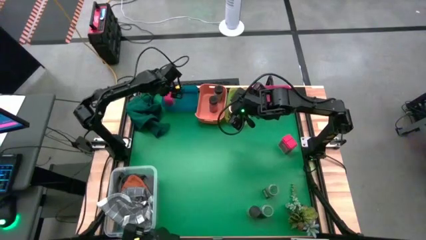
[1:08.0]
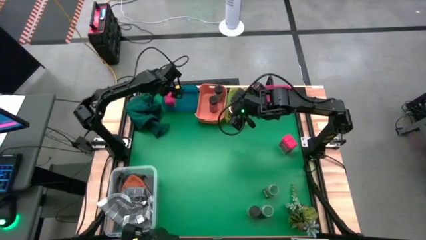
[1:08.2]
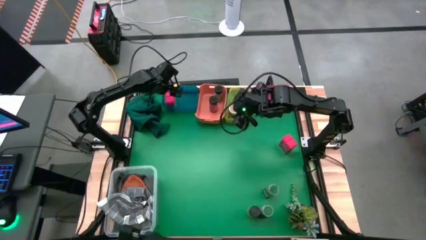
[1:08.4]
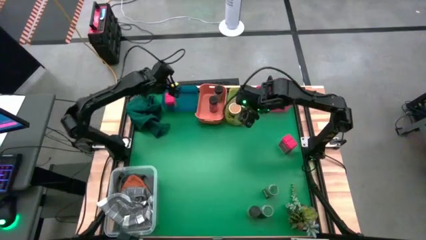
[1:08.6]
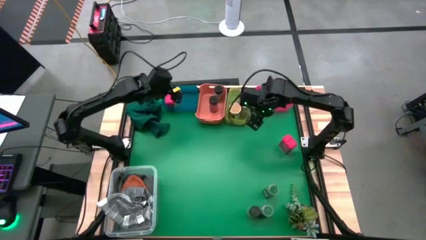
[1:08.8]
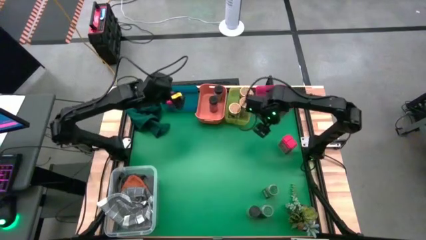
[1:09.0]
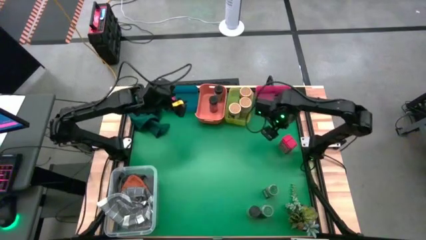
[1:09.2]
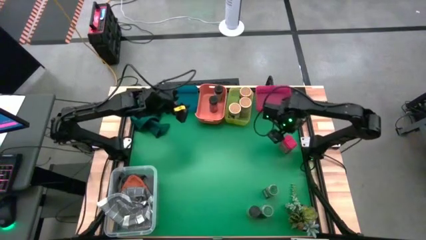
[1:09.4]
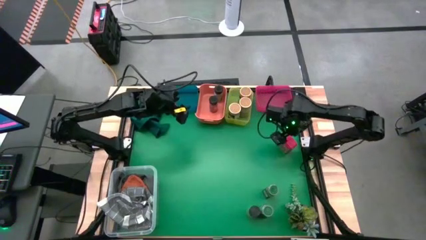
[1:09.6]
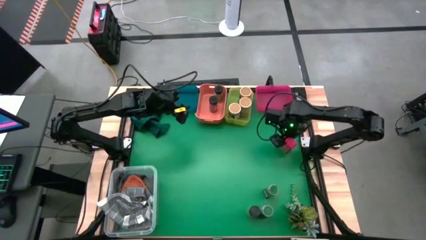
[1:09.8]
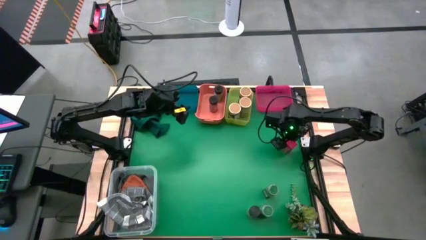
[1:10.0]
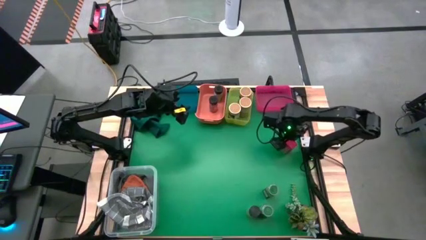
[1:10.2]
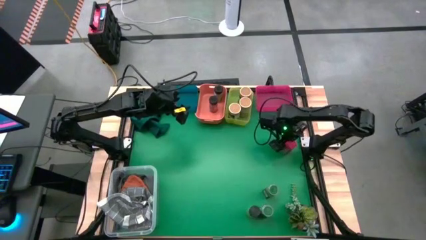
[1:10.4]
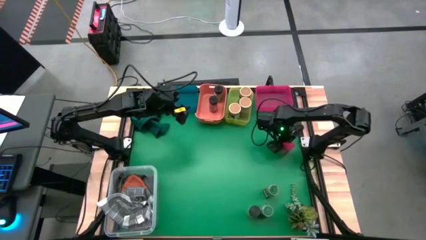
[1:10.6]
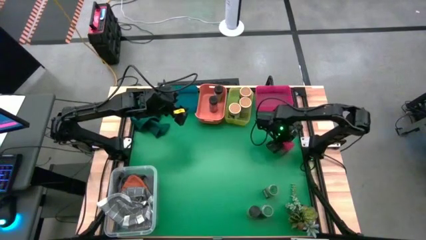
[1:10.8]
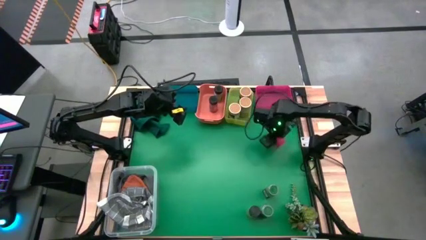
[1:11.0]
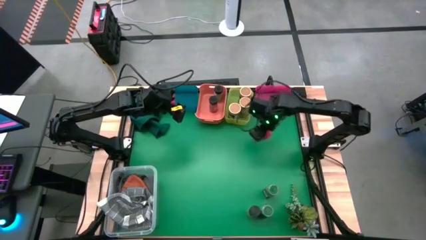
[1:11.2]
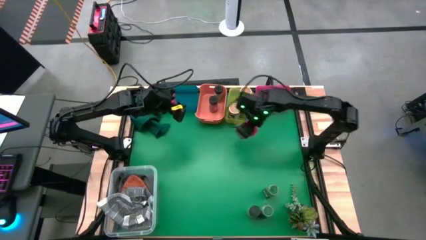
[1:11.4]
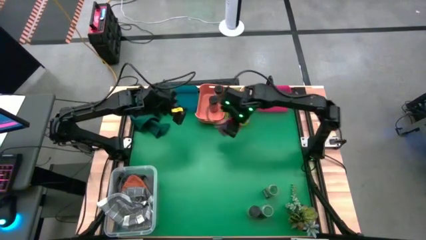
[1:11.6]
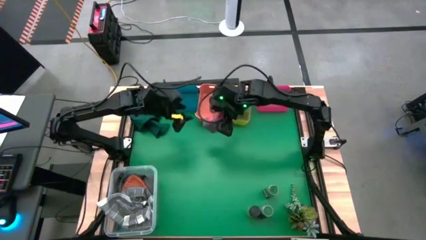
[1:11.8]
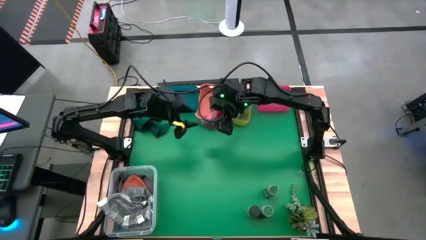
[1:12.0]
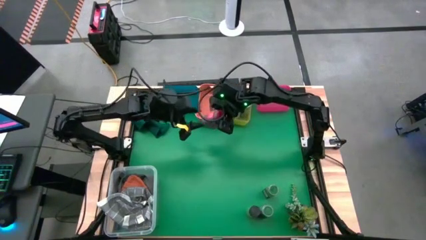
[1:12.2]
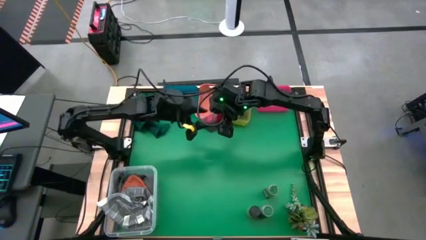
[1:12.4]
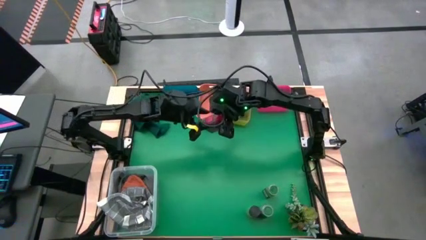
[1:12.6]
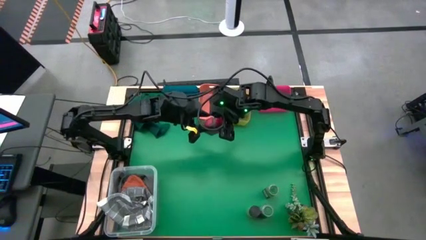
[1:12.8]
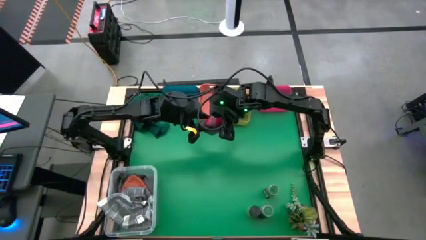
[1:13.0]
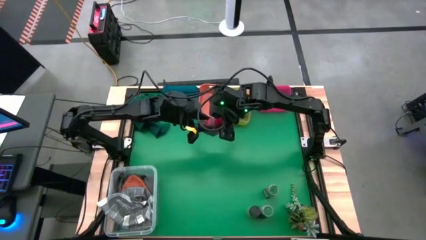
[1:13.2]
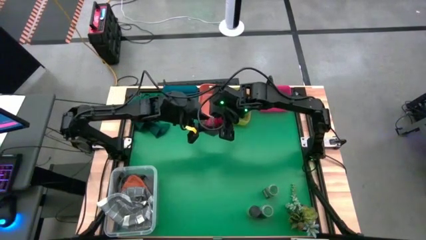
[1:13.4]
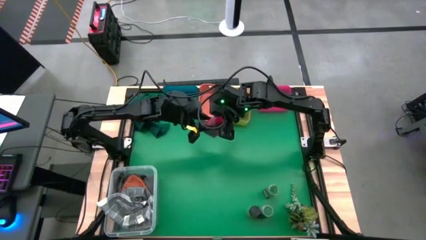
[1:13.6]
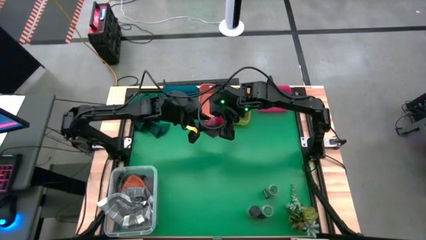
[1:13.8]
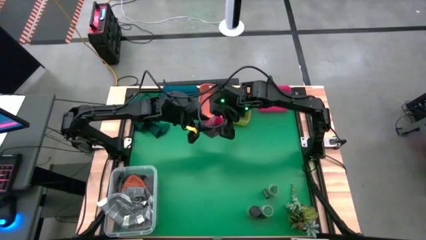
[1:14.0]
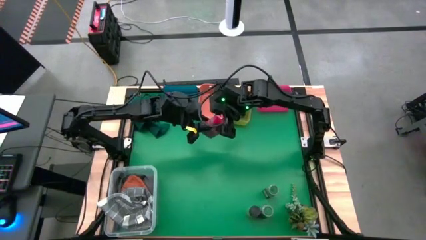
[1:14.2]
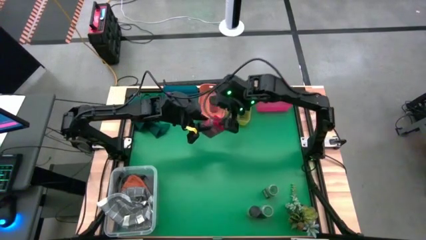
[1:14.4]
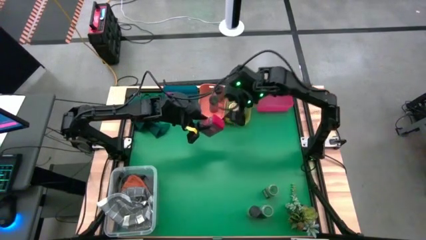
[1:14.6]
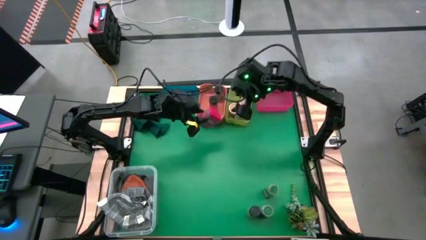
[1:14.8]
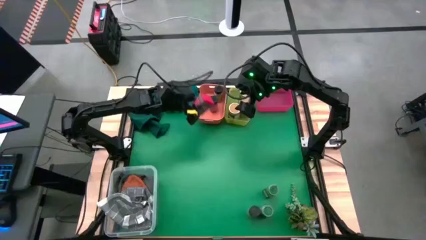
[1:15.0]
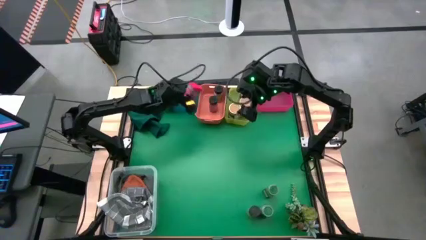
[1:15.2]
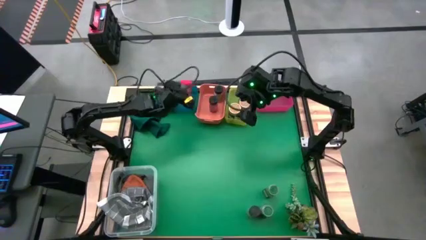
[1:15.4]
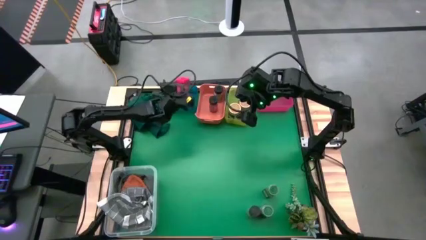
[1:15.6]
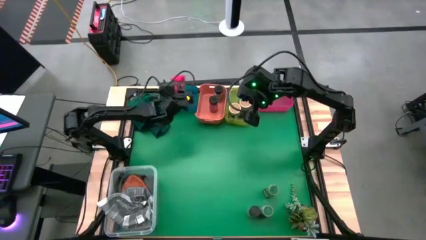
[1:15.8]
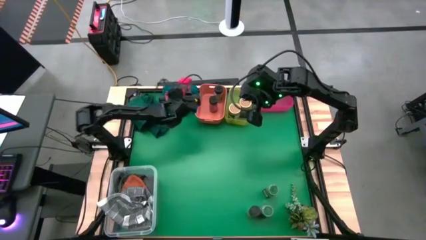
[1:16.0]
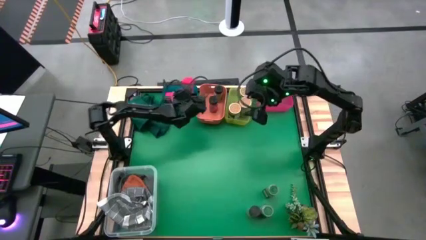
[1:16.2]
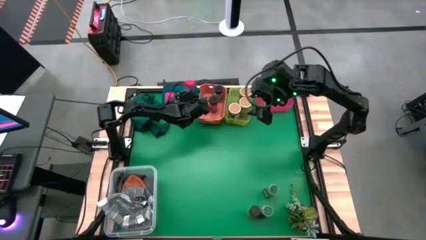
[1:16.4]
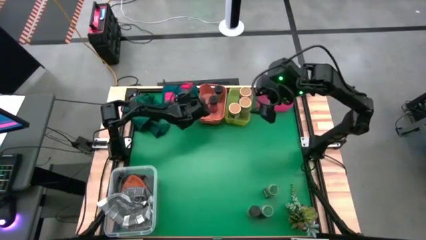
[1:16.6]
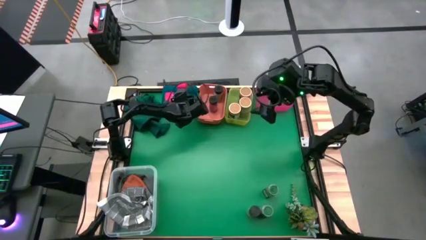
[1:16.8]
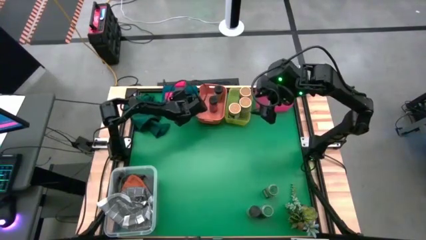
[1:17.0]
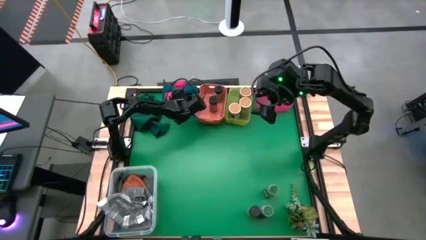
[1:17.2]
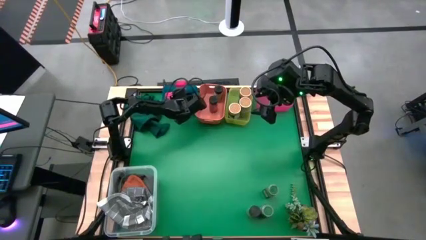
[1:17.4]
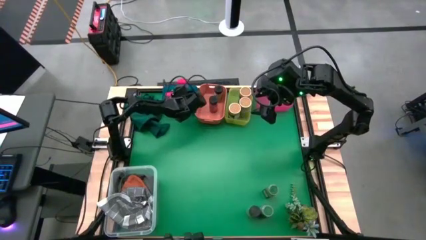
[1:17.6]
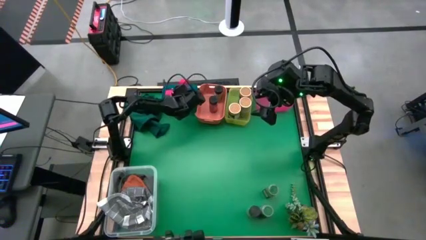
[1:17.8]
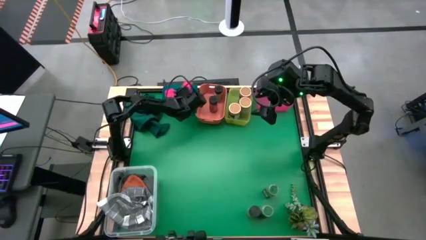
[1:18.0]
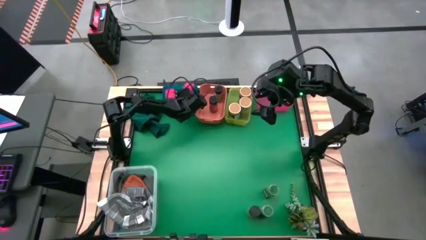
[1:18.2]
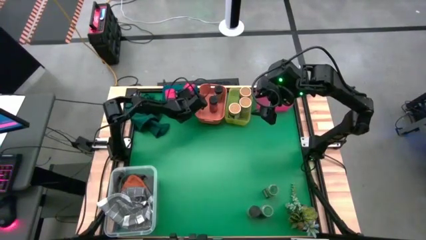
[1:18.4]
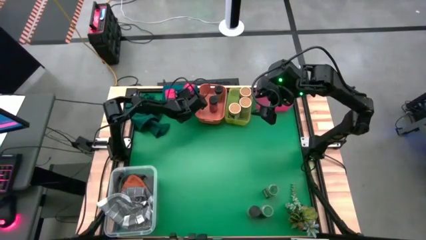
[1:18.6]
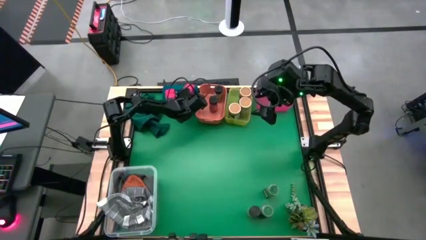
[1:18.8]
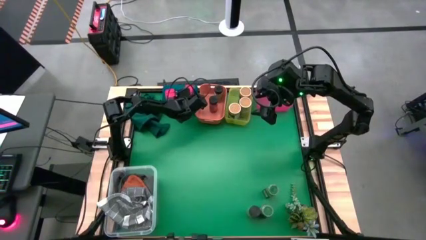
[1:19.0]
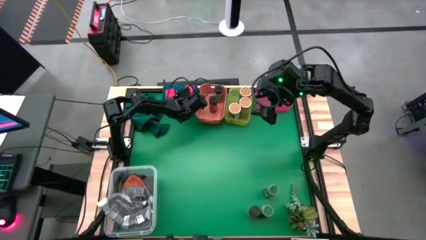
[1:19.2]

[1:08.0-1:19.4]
Task: Sort spices by type
Put the red seasoning bottle into the blue bin

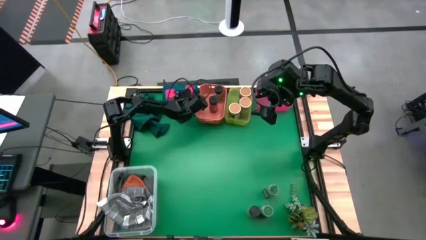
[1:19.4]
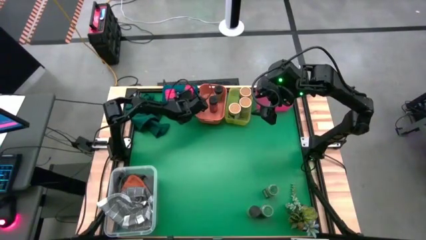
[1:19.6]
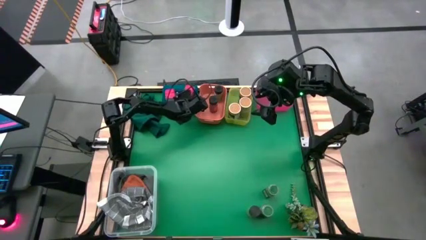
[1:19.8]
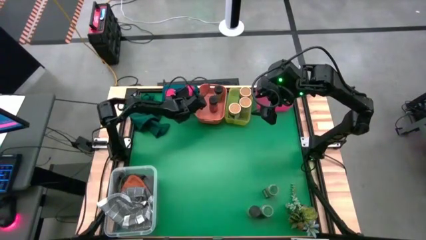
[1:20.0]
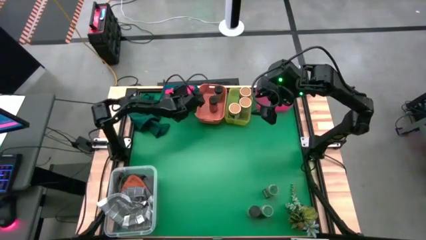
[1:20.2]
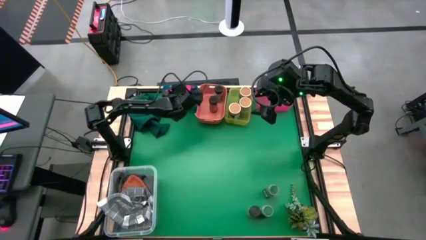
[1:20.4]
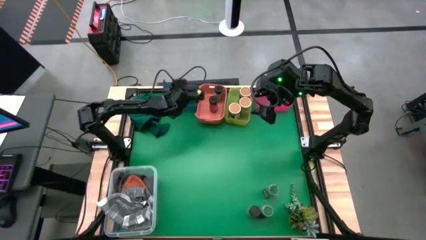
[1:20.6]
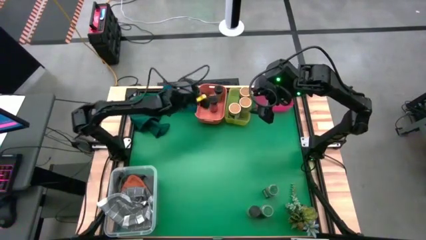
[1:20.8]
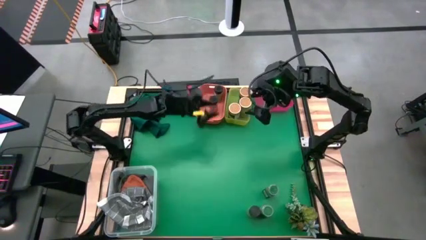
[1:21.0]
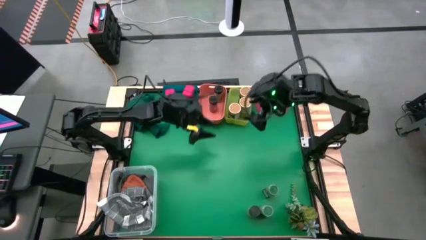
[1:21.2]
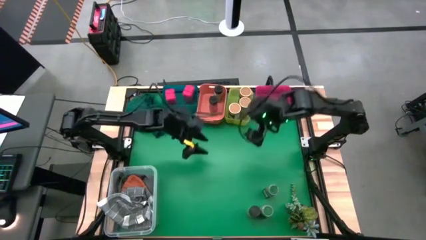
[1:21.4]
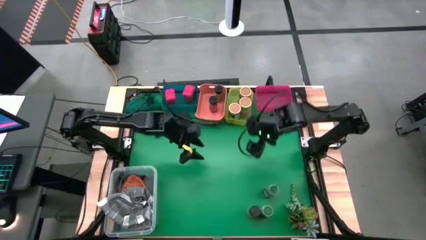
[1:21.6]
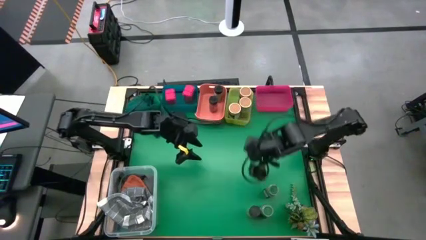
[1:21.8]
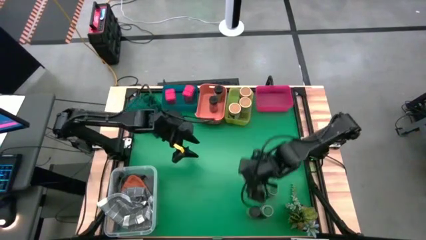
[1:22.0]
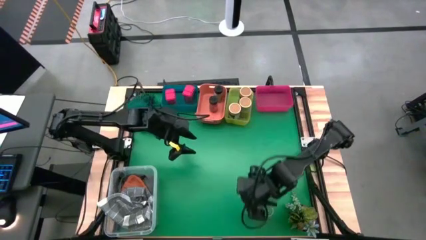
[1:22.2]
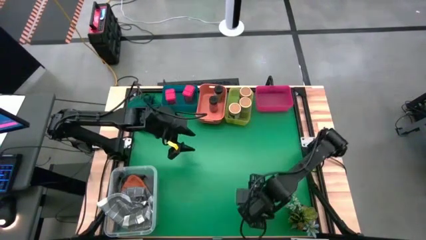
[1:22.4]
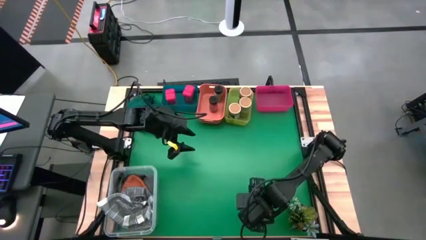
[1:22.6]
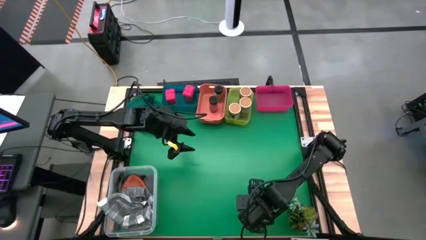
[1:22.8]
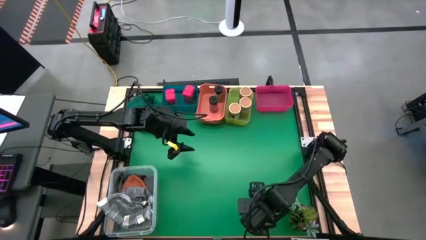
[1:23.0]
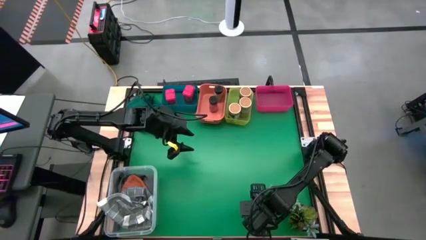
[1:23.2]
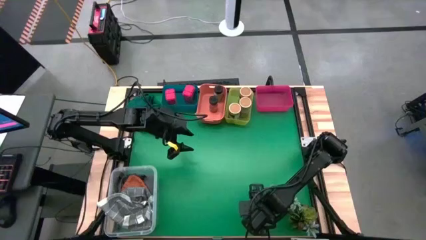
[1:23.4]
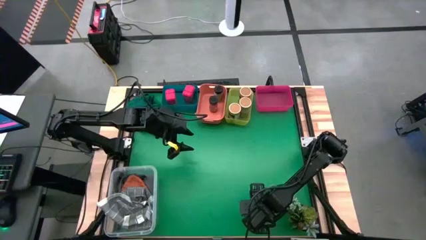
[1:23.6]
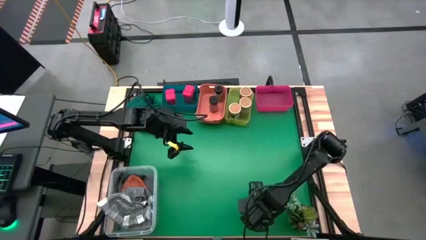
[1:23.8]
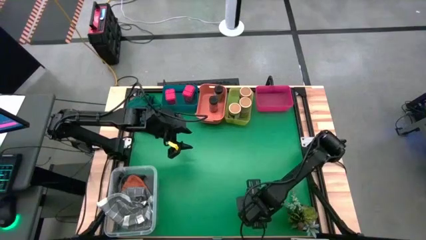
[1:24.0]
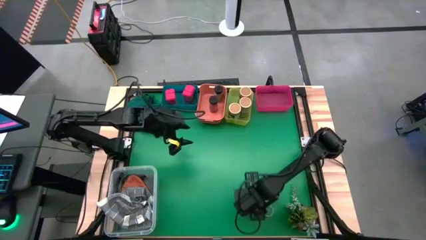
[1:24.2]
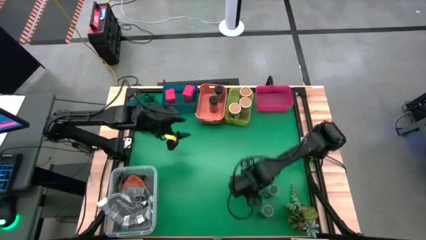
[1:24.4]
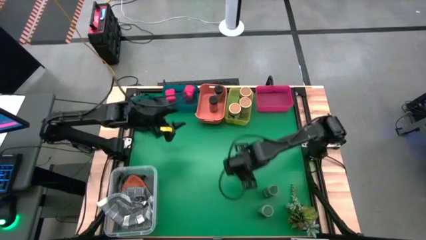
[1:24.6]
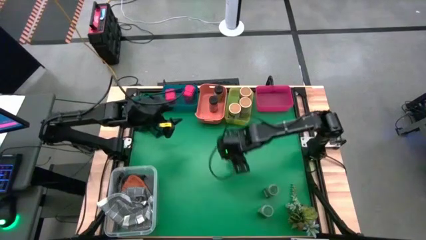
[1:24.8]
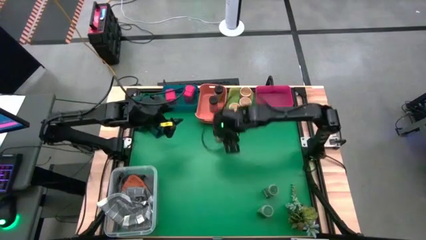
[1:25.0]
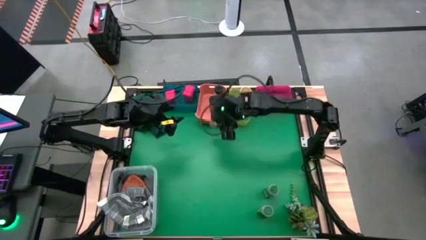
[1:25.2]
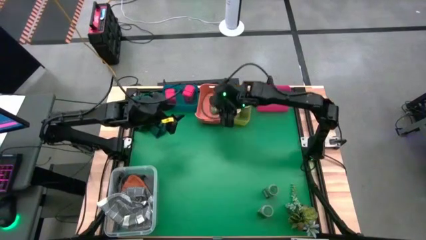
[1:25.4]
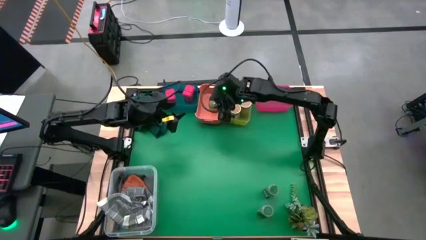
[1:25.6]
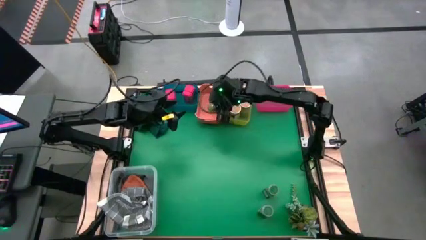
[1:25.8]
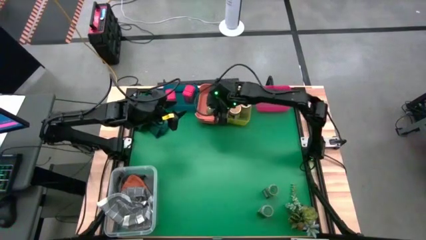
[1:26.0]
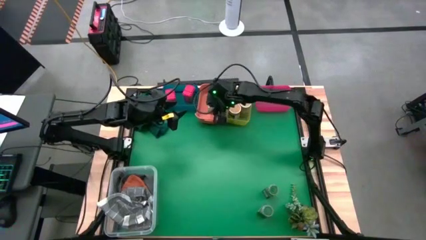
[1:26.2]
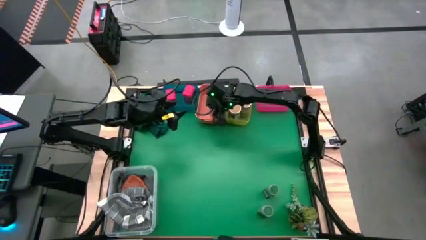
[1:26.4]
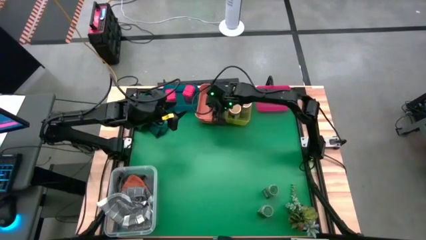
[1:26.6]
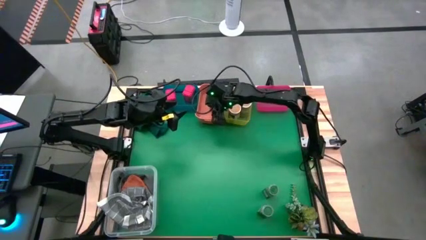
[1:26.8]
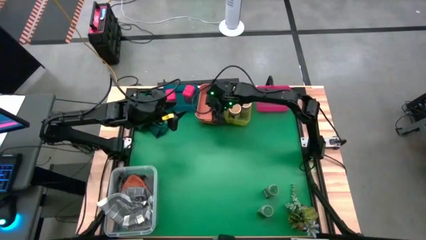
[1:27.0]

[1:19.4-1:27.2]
Put the black seasoning bottle into the orange bin
